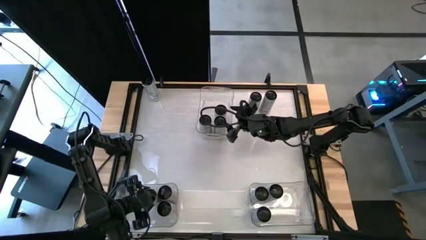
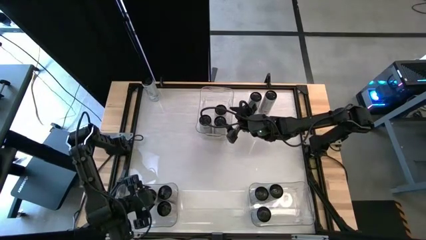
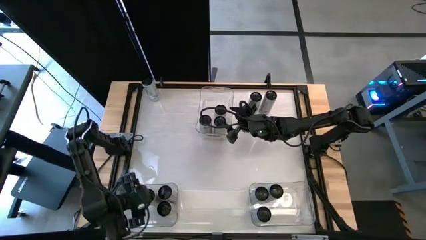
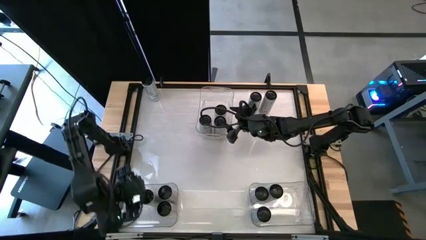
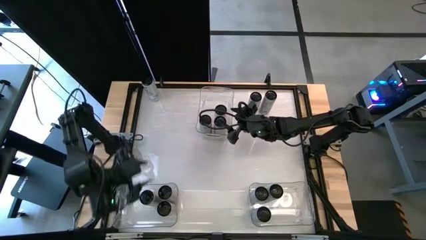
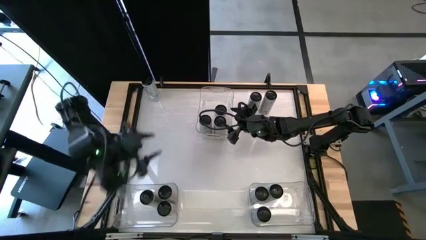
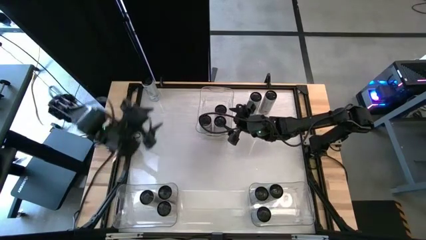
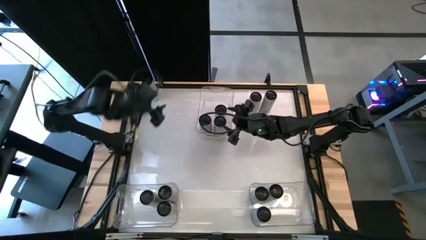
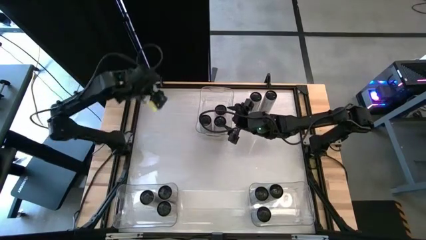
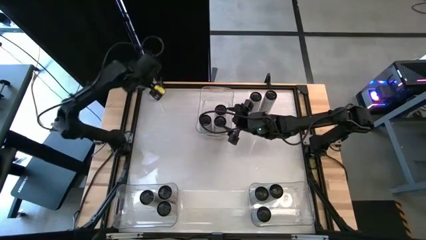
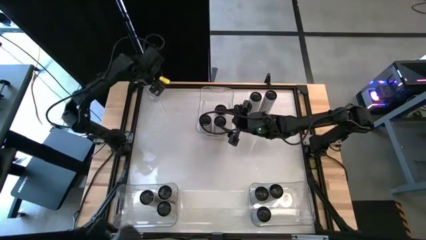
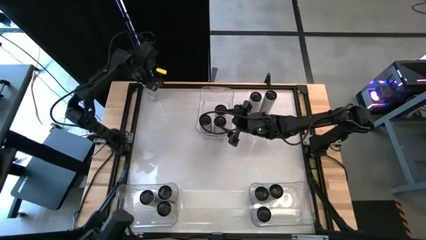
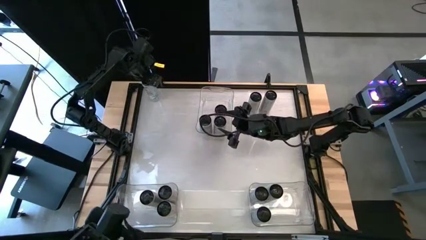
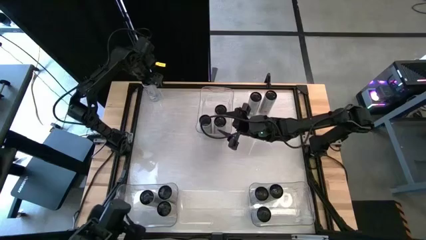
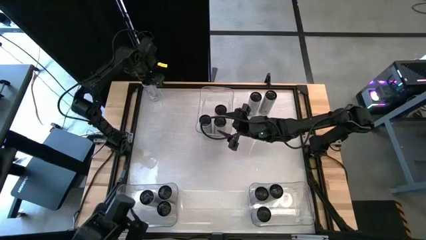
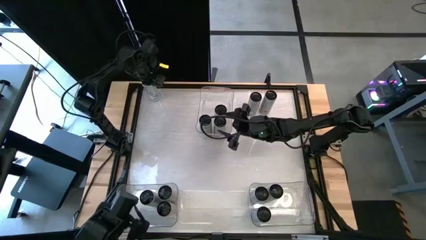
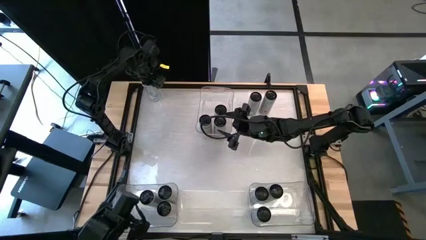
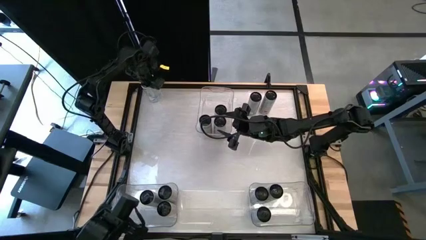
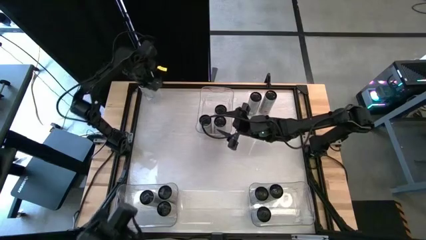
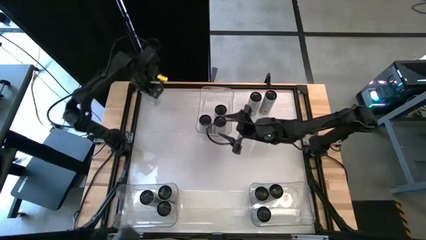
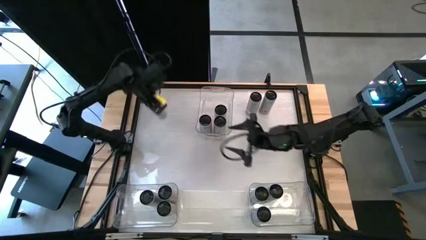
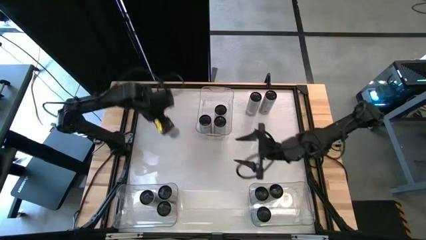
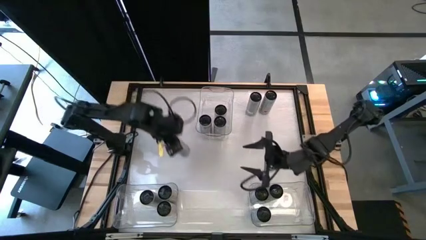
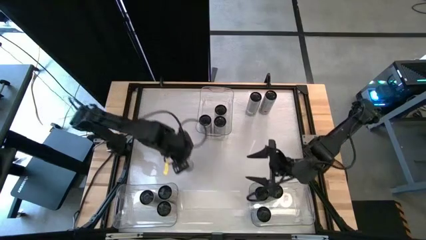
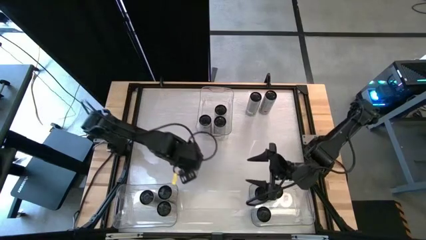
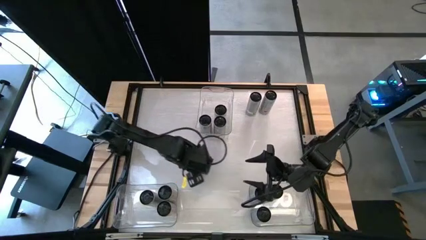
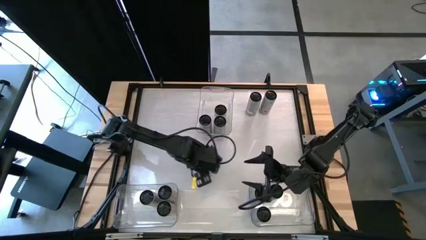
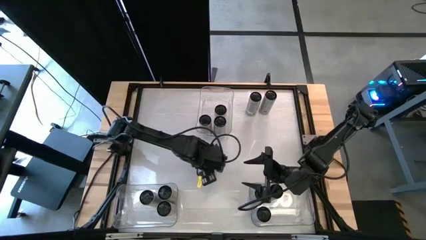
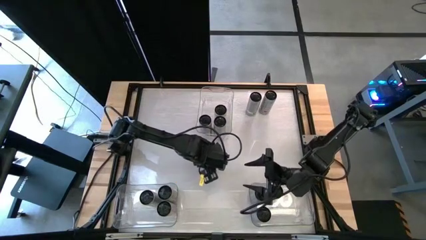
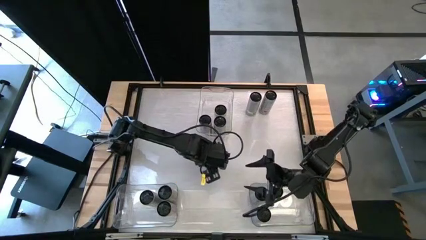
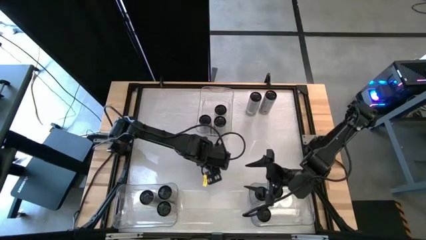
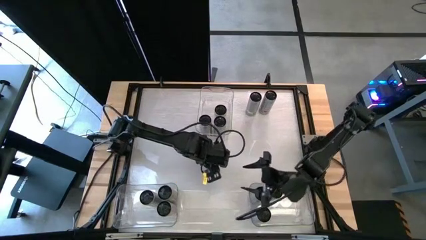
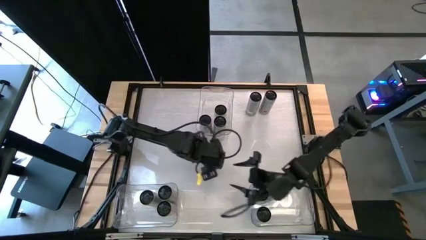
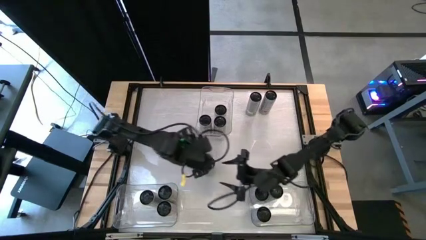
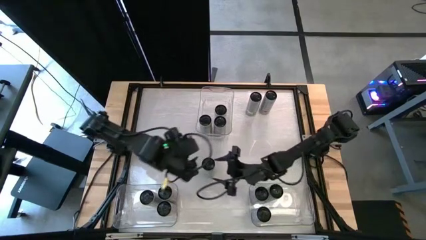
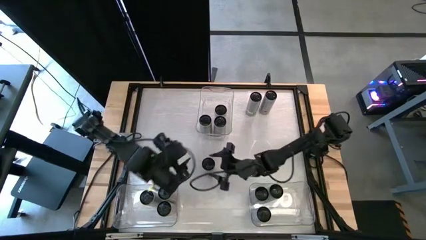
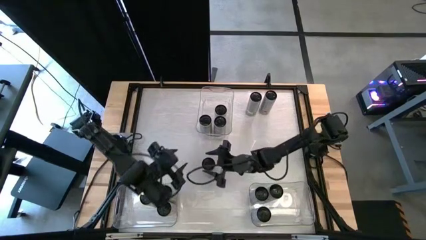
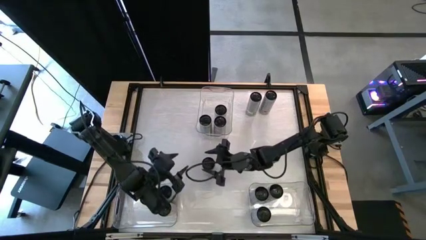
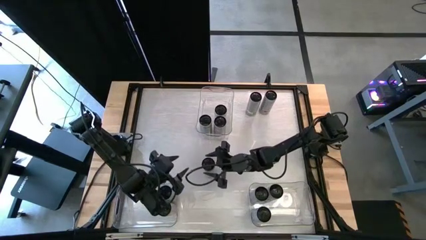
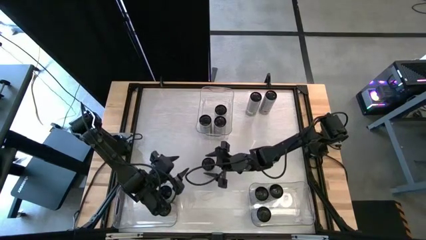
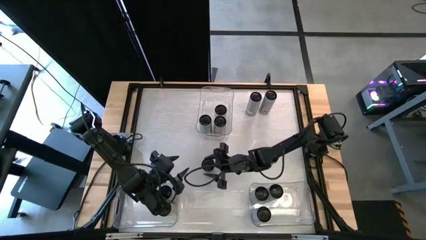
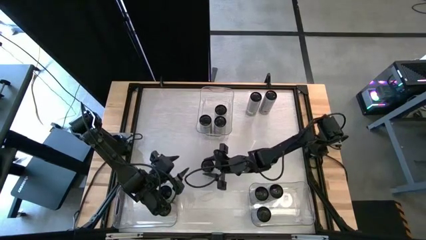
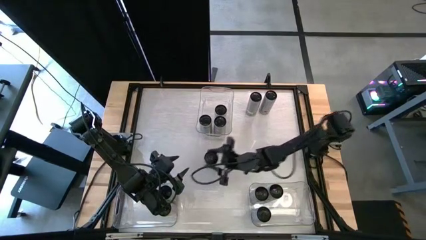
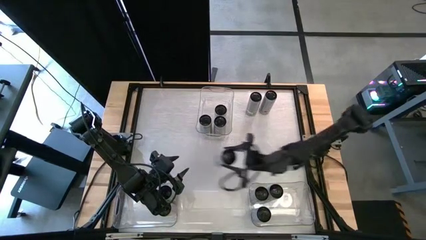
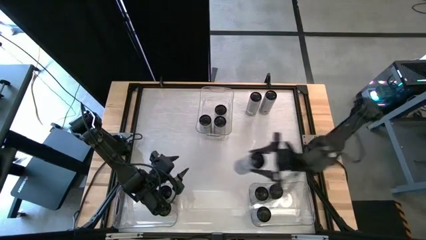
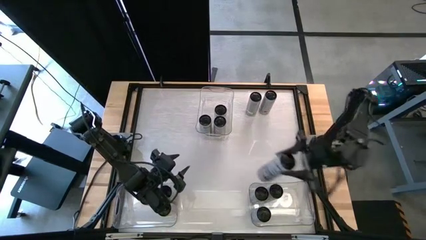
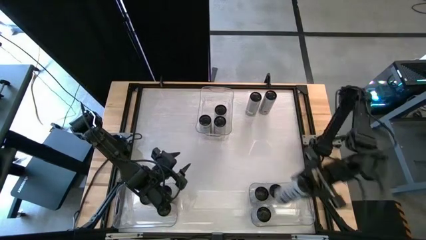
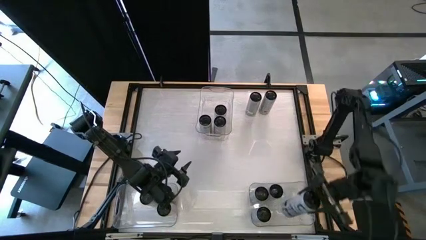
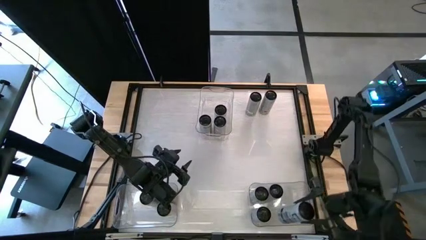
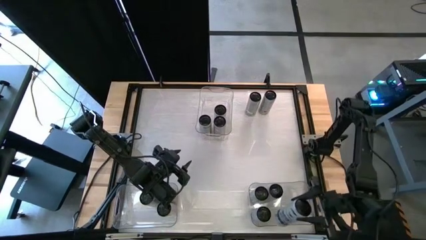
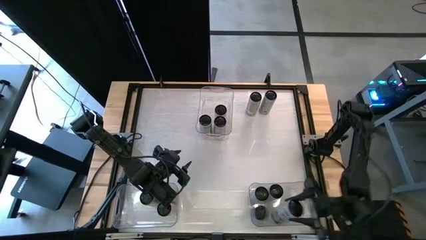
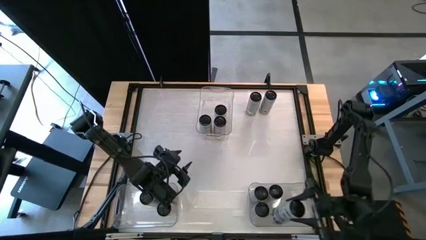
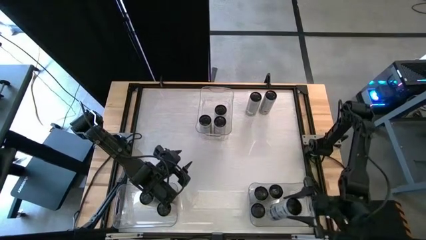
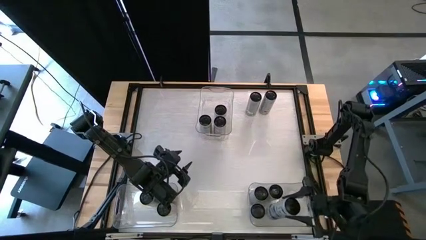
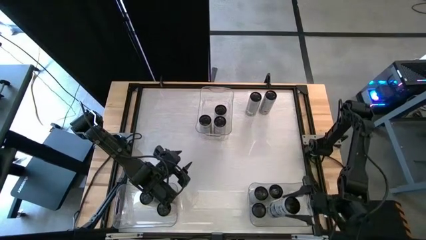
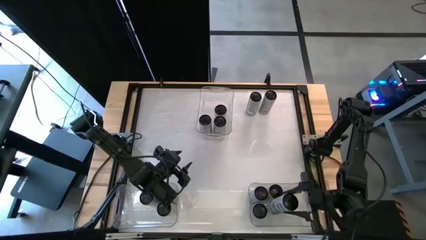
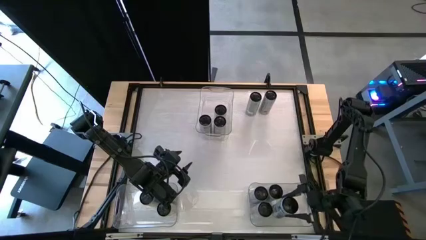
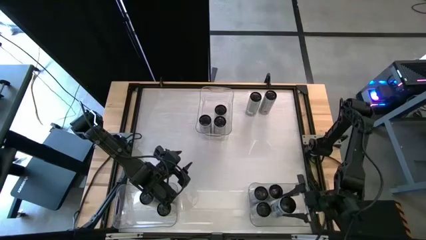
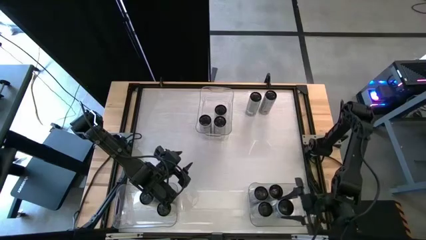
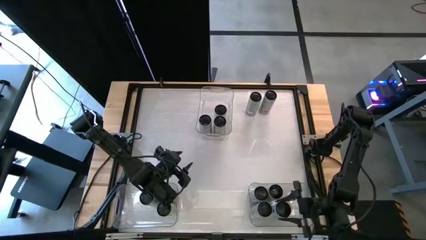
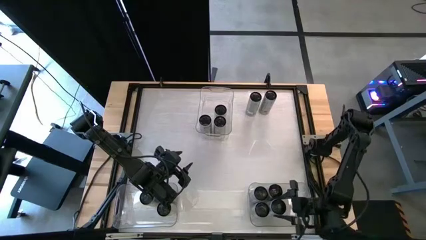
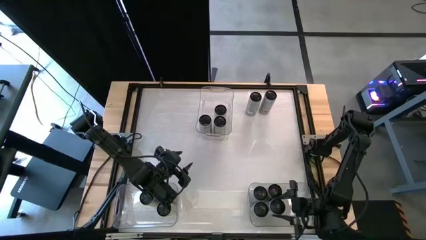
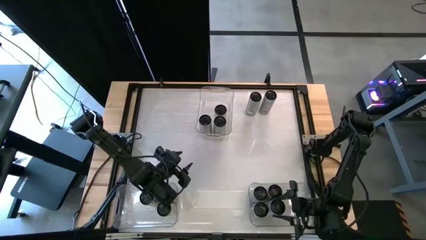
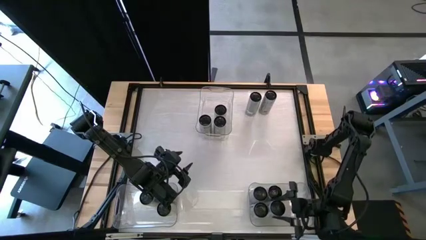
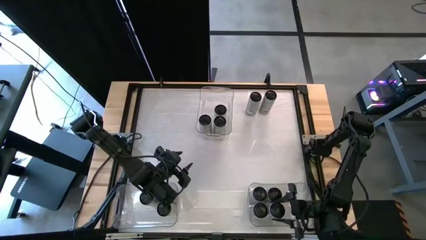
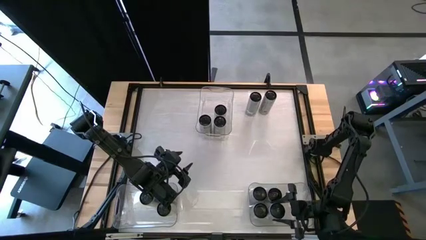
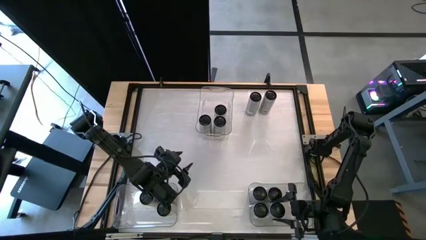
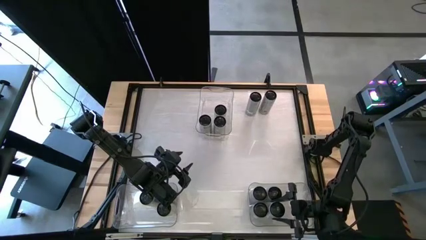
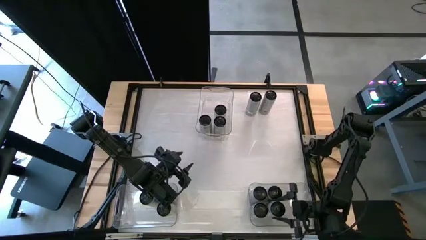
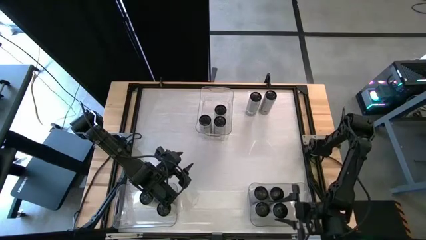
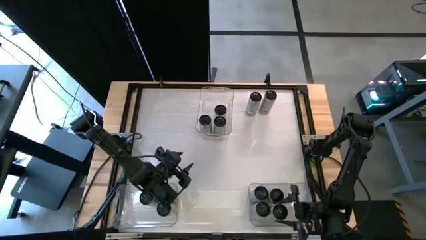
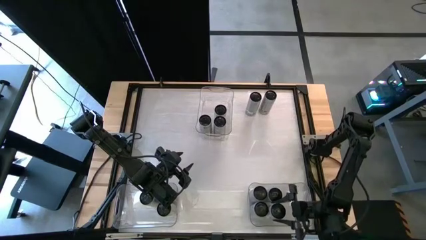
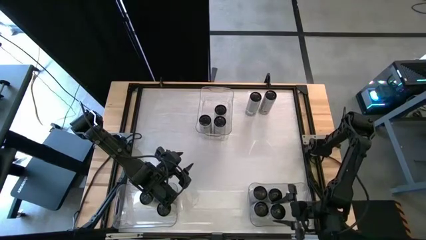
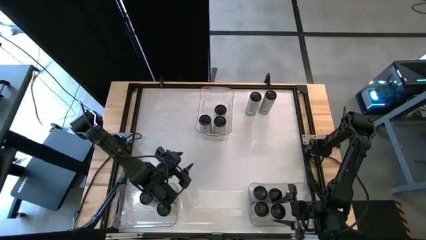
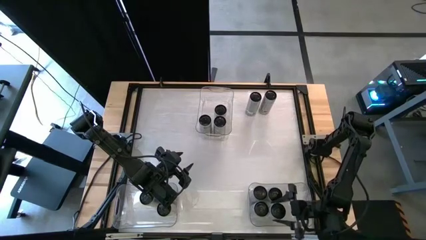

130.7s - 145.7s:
Task: Sort soda cans
Put the white blue soda can into the bottom right transparent bin
